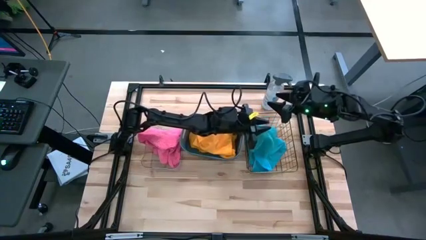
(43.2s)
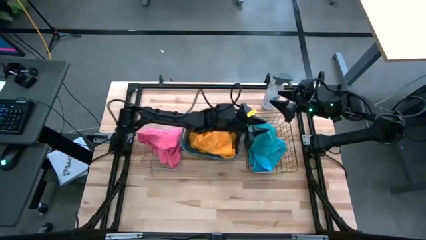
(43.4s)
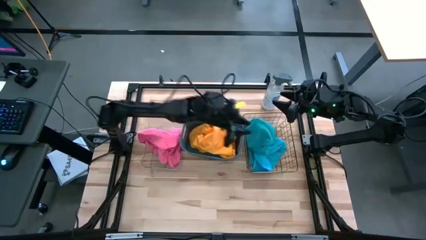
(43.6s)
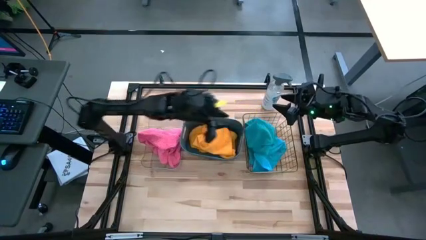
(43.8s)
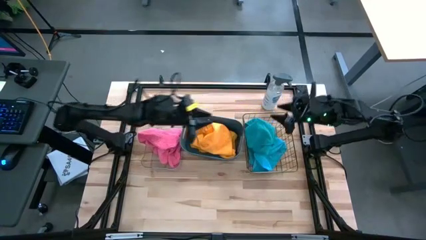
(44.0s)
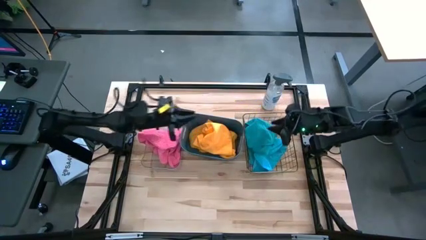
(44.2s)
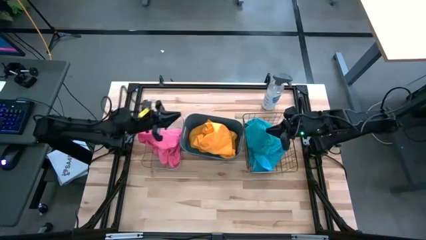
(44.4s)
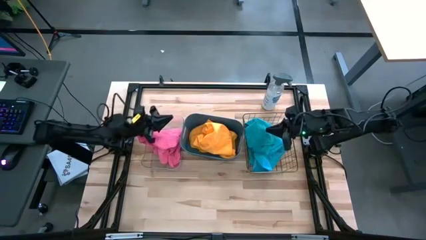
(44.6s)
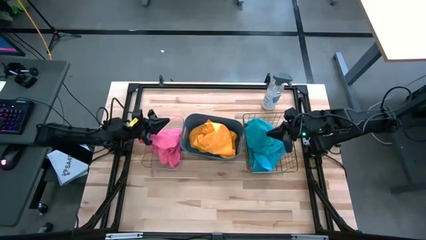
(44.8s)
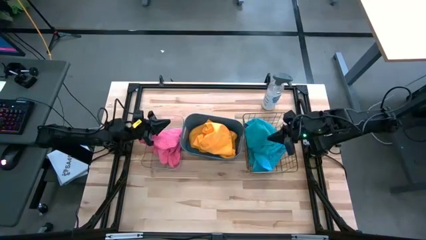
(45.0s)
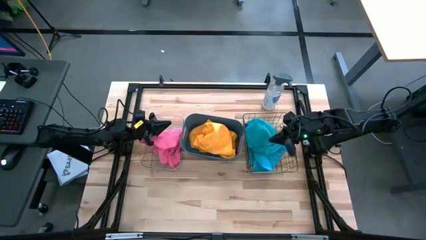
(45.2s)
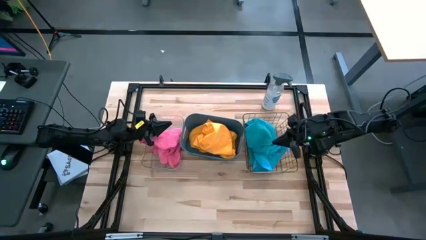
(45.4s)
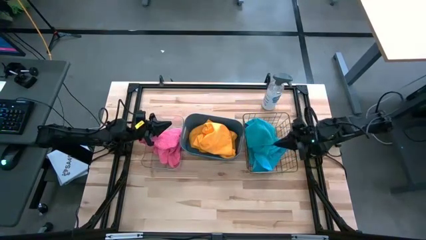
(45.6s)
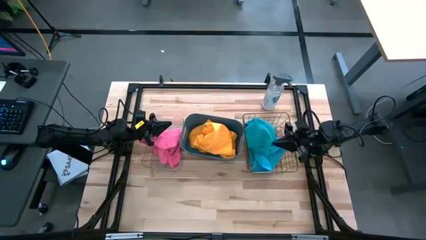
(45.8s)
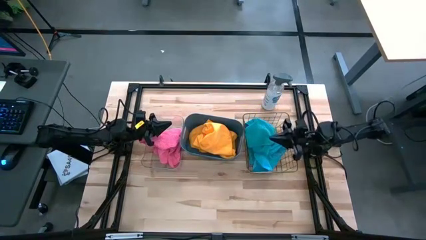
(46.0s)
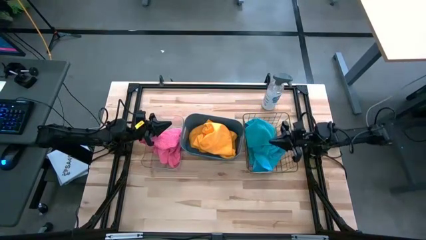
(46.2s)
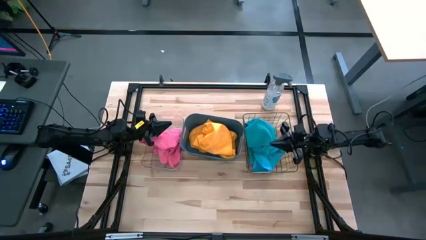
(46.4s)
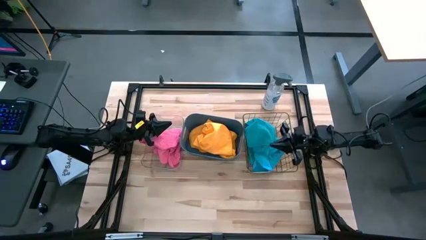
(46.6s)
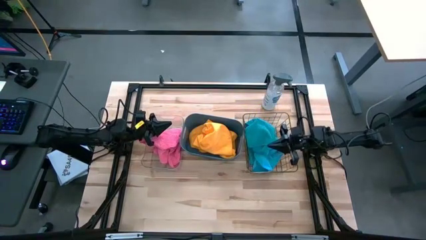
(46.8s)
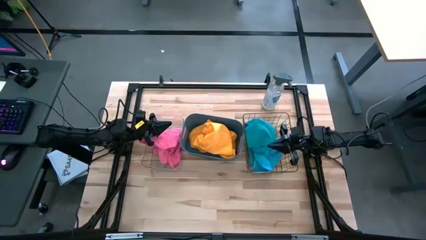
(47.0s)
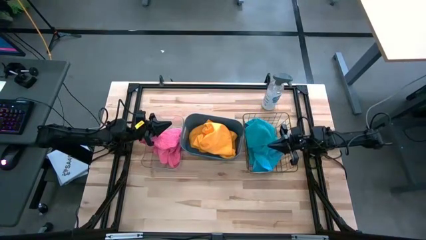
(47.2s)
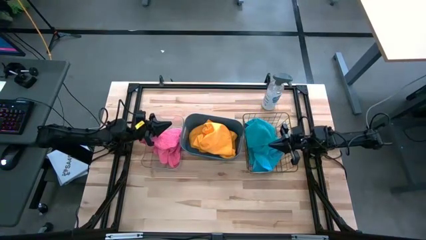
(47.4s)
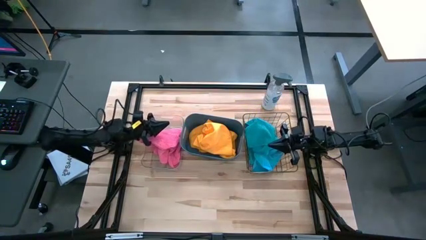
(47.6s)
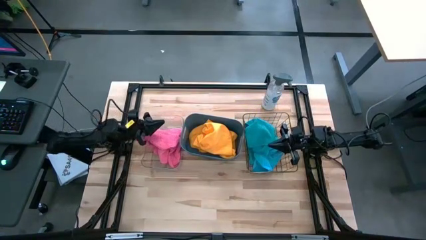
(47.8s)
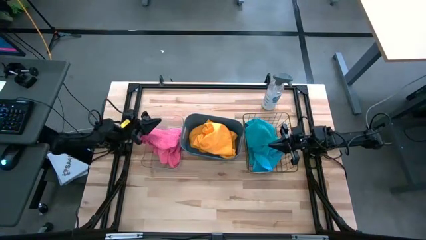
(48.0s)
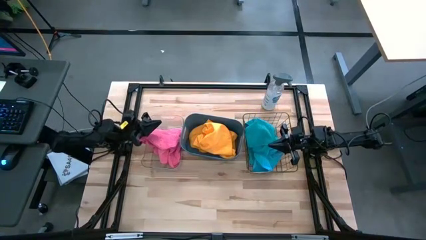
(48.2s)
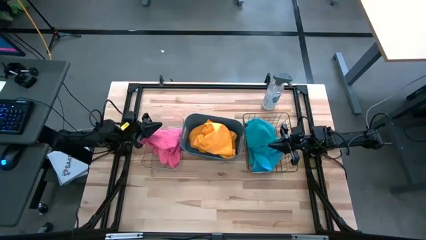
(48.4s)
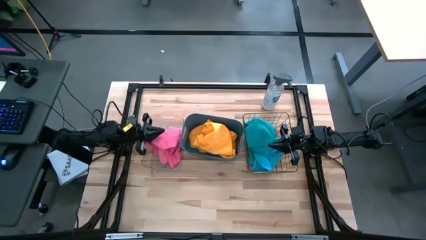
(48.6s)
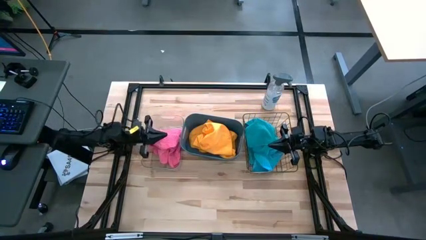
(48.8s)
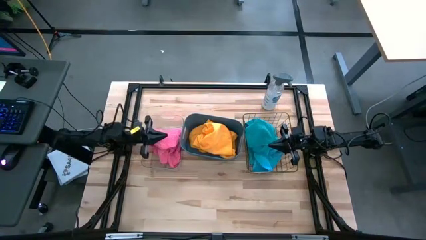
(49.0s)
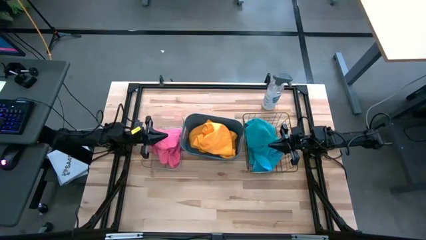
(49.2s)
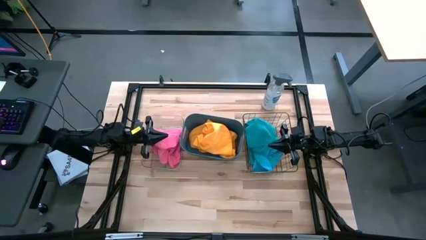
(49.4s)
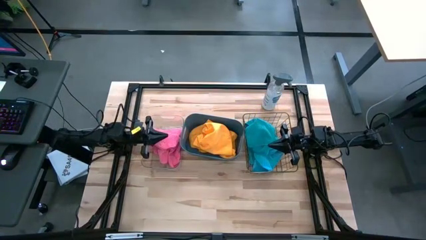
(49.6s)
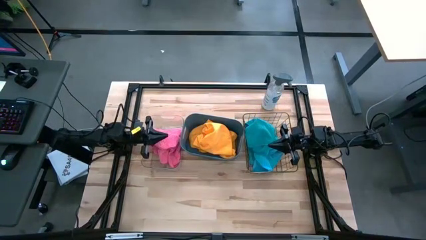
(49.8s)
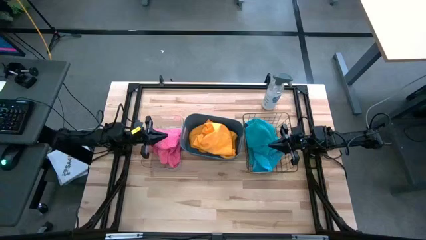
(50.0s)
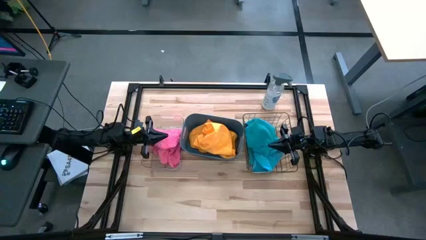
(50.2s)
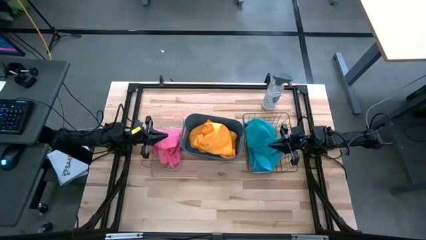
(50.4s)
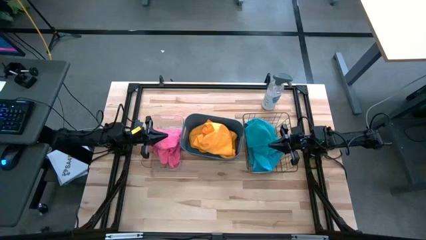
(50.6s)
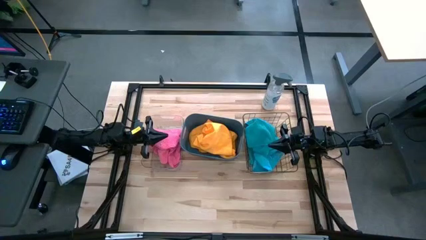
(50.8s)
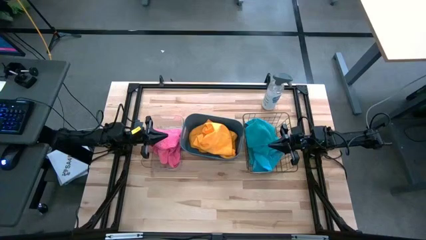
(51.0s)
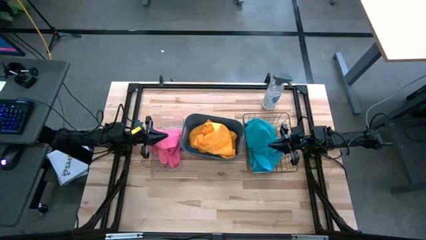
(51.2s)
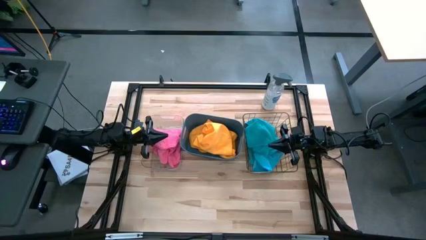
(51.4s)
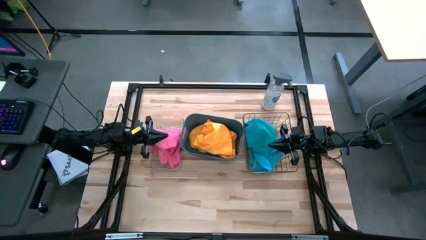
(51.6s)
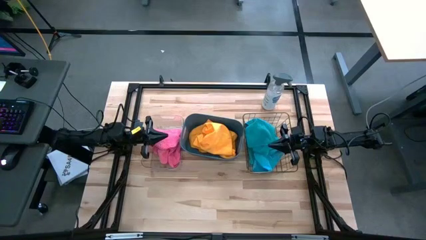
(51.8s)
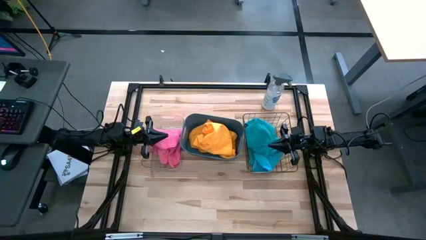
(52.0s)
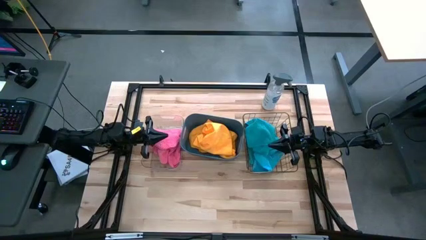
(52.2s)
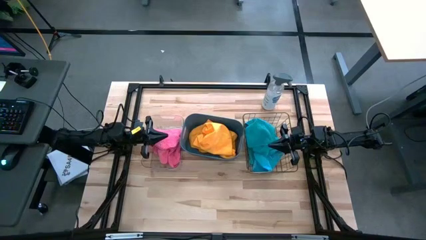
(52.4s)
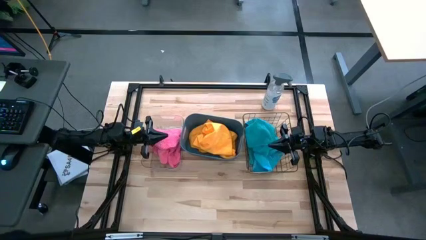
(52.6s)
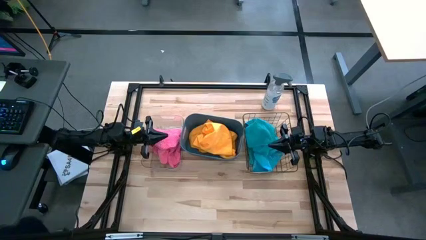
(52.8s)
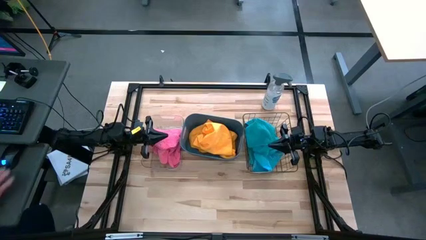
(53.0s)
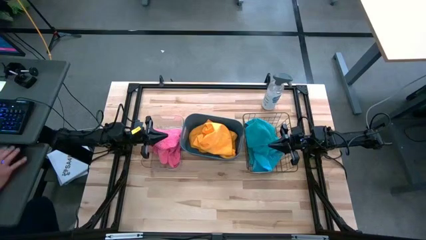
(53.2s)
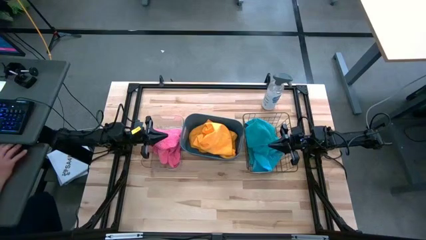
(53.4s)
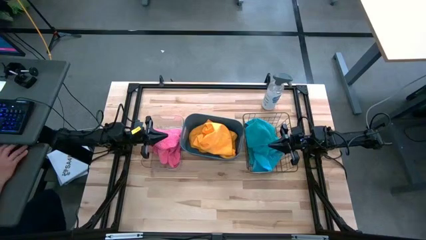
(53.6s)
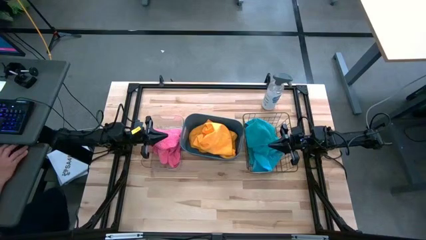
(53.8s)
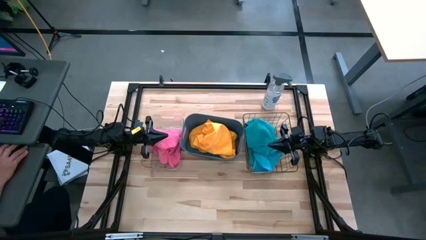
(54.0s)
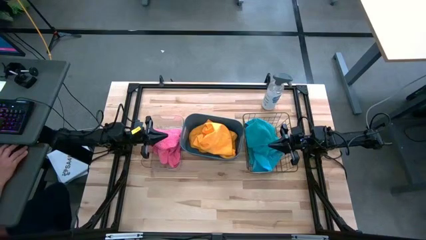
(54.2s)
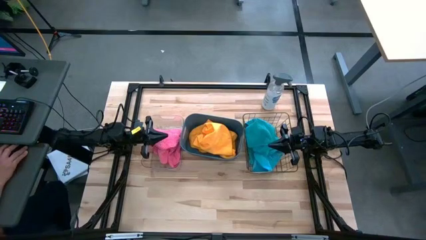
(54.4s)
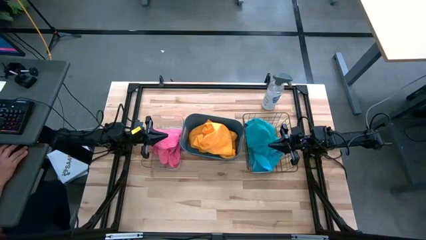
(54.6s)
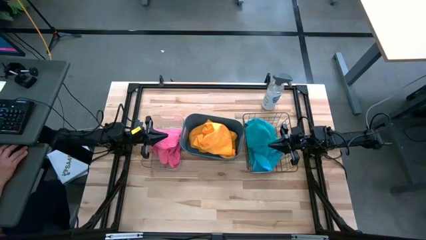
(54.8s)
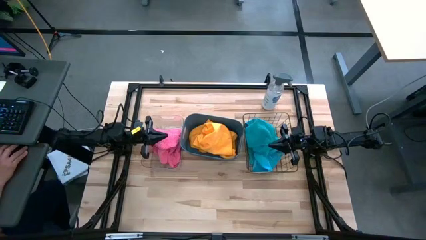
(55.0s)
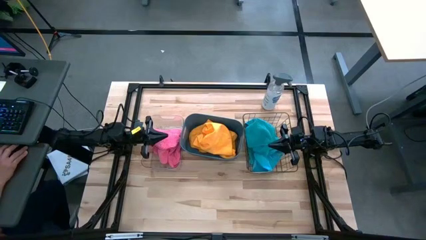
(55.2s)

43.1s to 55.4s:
Task: Sort microfiber towel by color & place in baskets
Return to Home Position

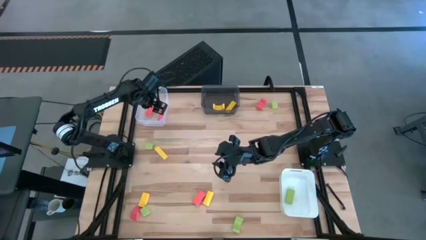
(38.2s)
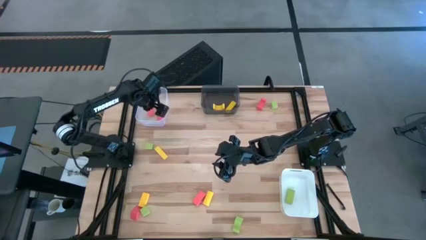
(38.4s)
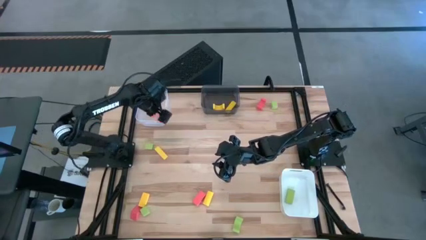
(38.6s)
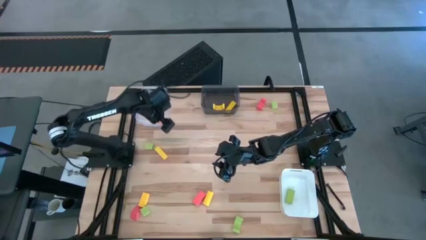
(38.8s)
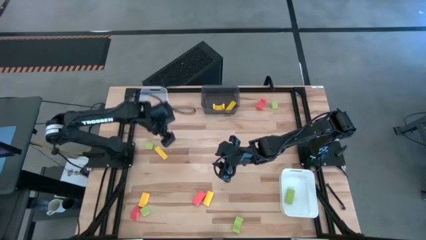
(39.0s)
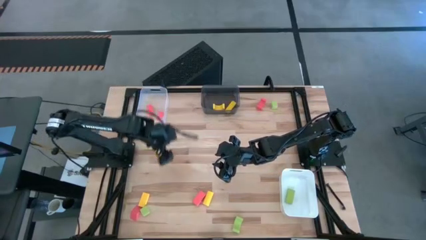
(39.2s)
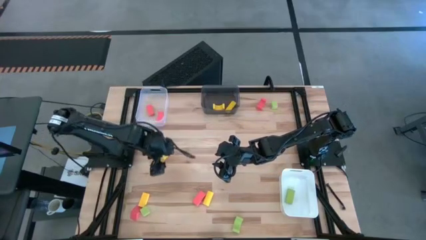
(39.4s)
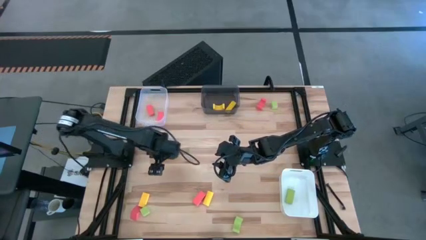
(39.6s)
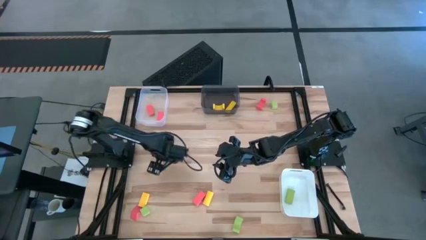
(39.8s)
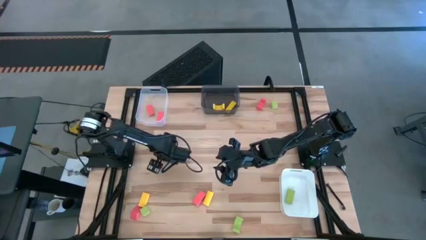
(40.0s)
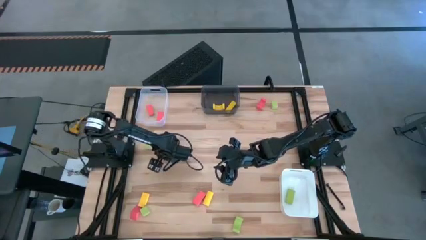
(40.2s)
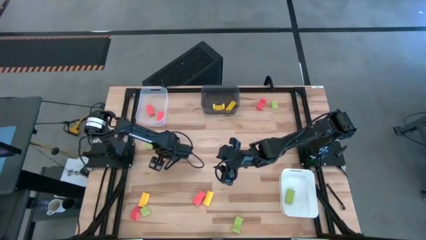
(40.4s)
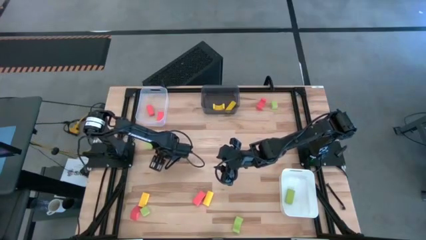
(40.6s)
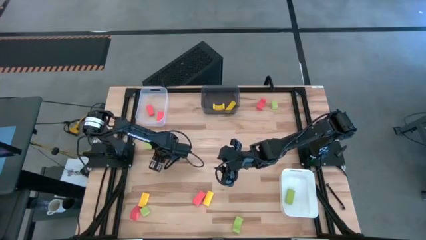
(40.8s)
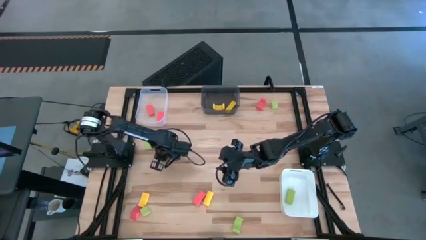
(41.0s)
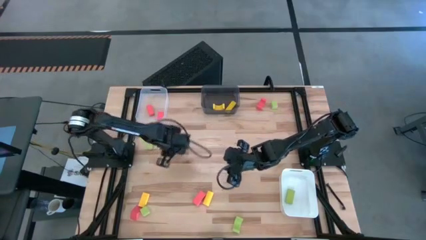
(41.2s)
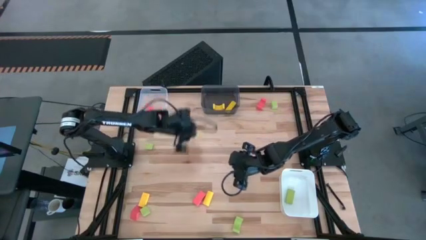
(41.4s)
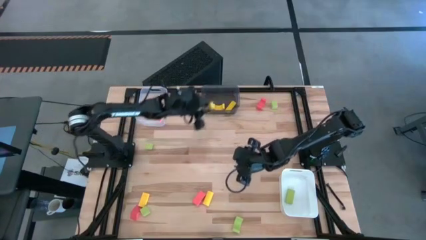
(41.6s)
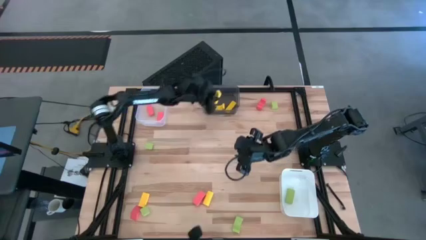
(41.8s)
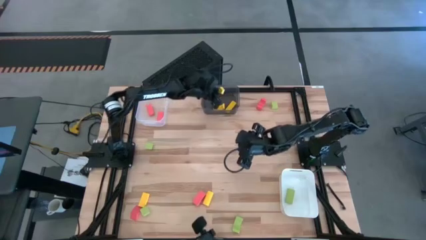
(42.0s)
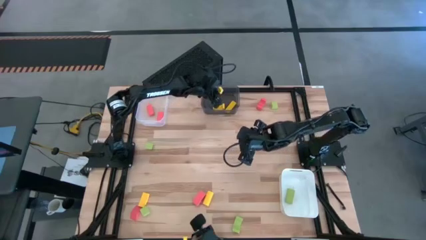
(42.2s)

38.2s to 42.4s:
Task: Sort & place blocks by color
Put the yellow block into the black bin
